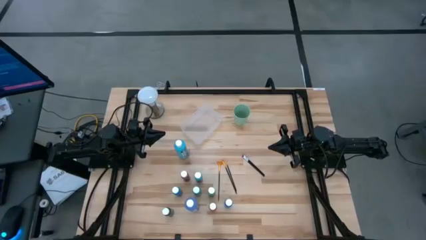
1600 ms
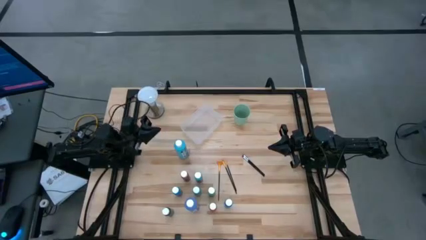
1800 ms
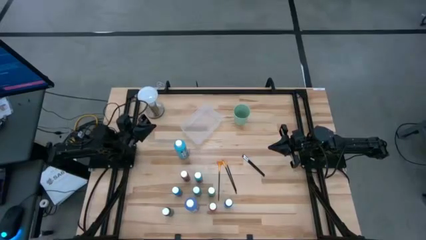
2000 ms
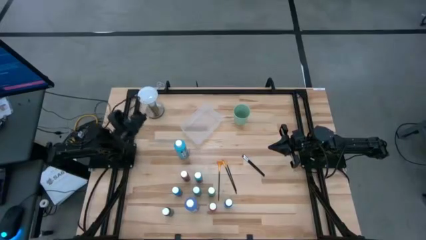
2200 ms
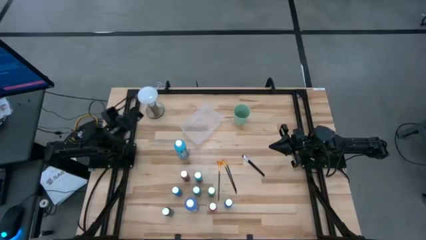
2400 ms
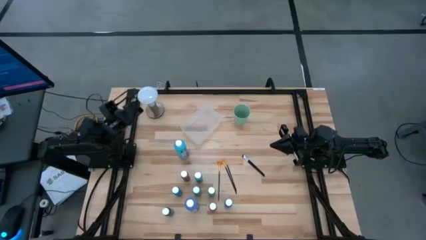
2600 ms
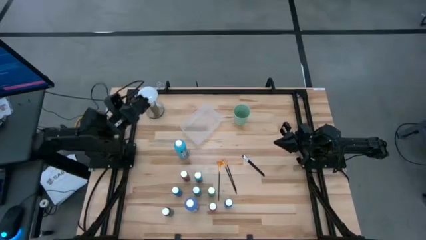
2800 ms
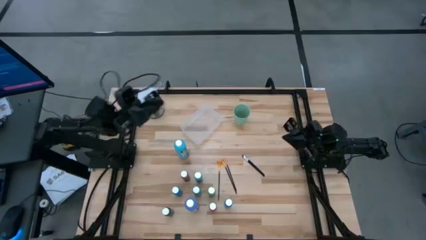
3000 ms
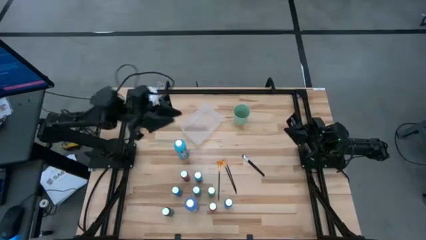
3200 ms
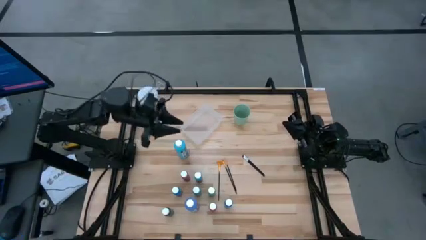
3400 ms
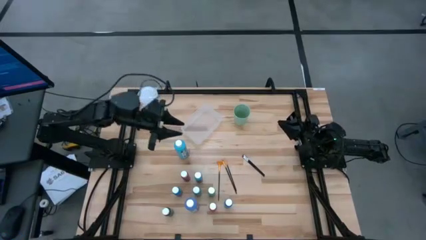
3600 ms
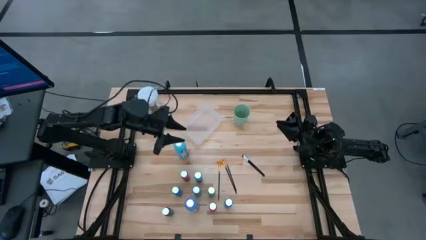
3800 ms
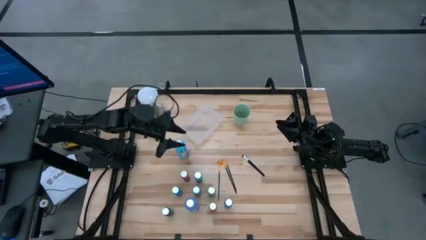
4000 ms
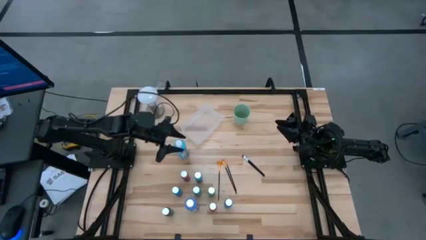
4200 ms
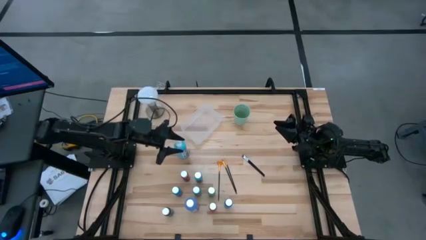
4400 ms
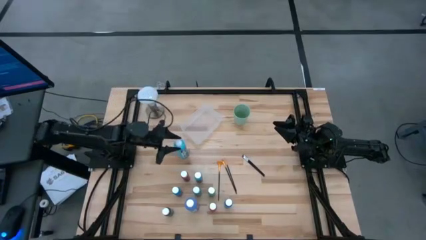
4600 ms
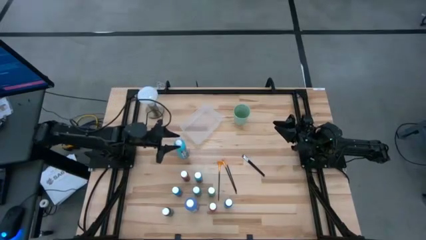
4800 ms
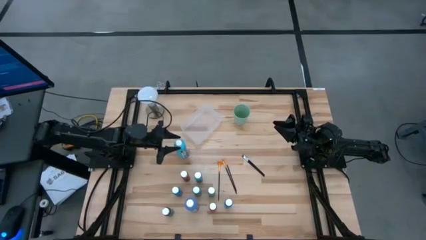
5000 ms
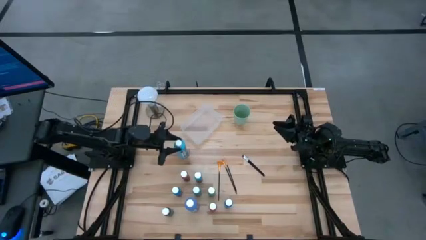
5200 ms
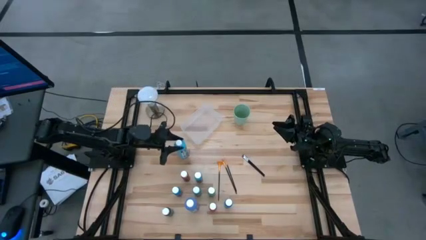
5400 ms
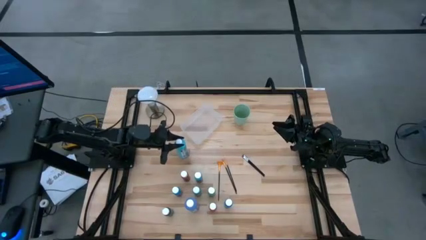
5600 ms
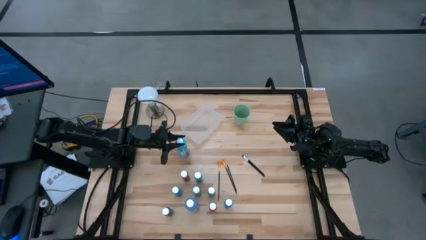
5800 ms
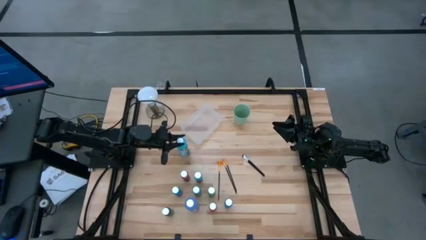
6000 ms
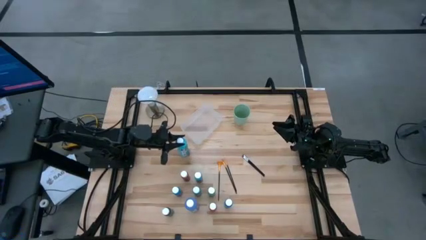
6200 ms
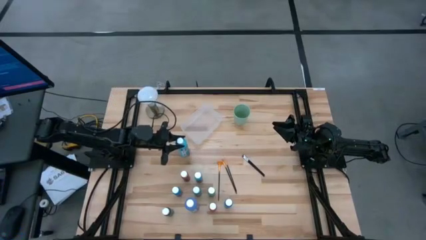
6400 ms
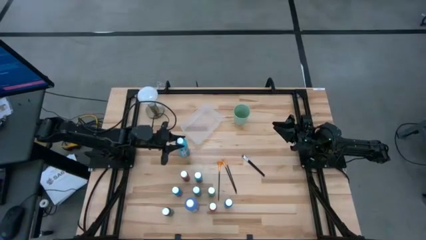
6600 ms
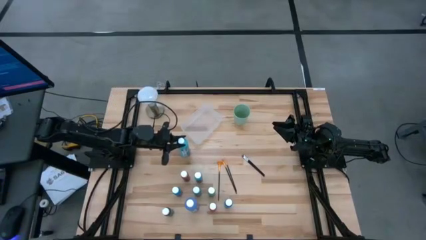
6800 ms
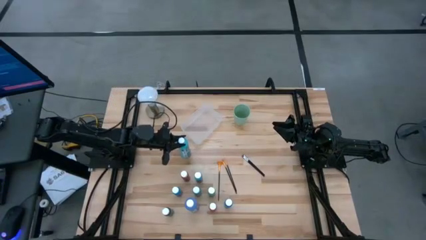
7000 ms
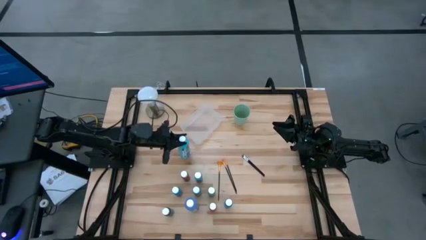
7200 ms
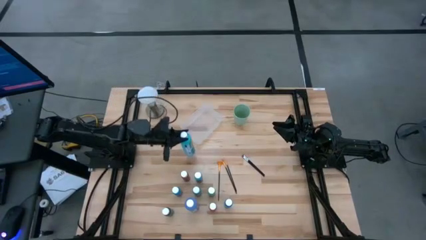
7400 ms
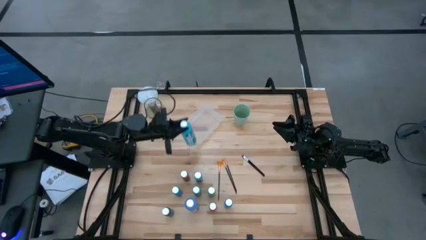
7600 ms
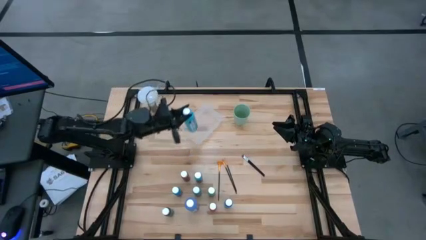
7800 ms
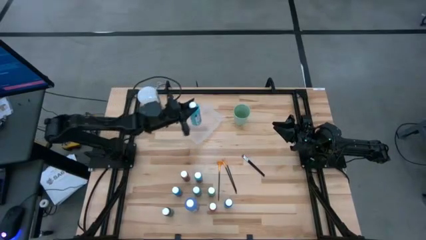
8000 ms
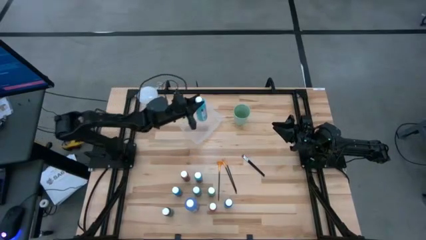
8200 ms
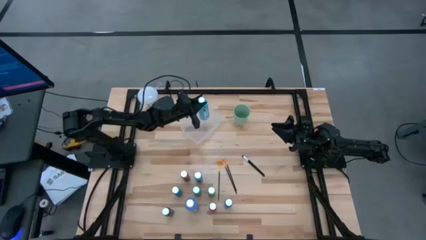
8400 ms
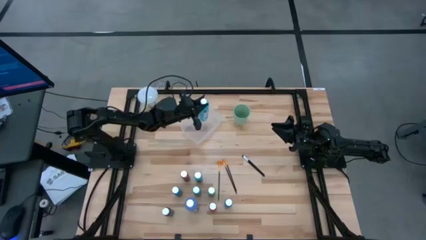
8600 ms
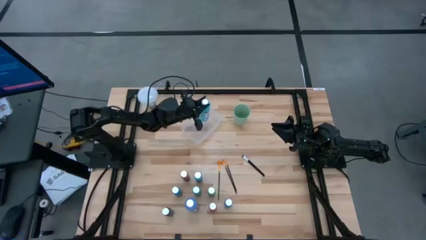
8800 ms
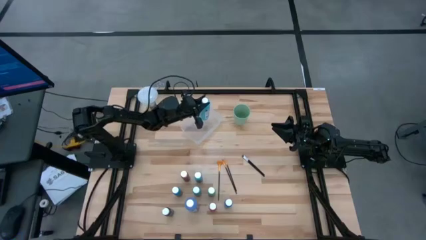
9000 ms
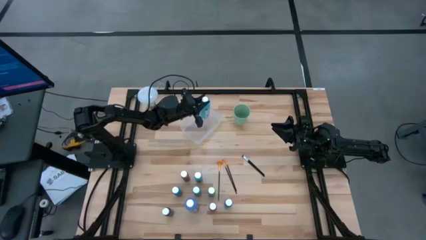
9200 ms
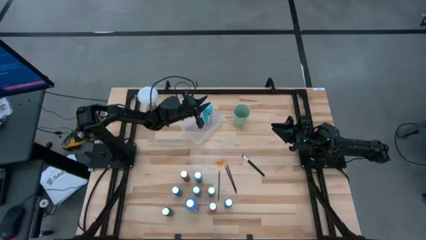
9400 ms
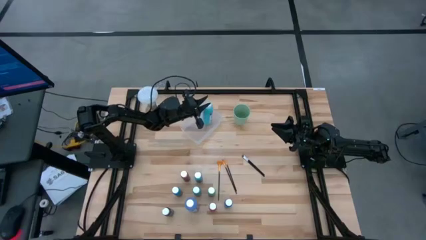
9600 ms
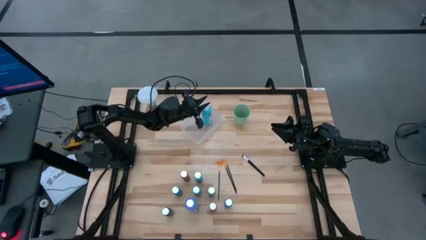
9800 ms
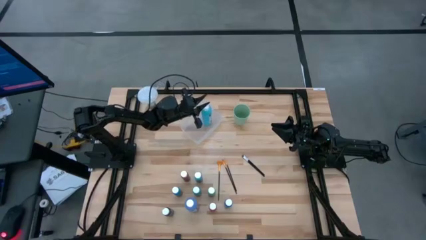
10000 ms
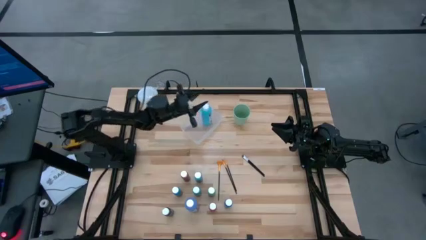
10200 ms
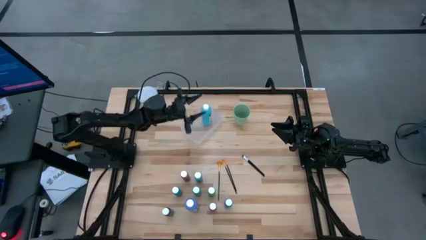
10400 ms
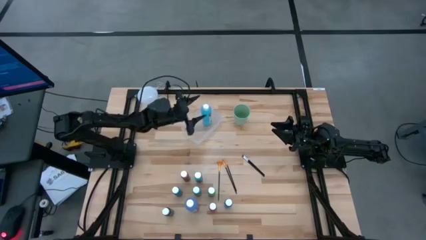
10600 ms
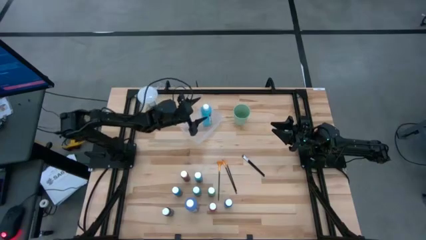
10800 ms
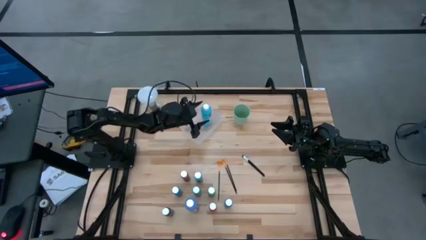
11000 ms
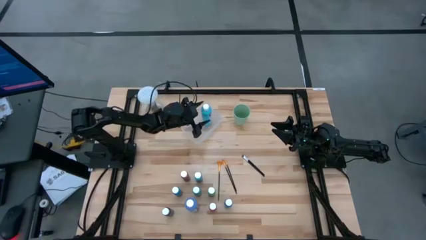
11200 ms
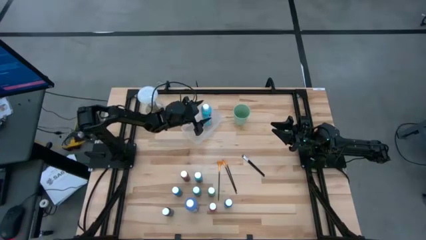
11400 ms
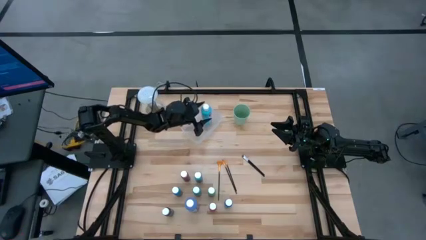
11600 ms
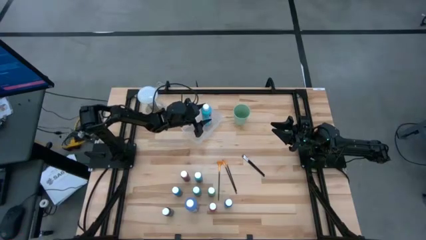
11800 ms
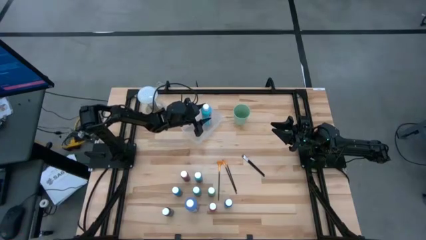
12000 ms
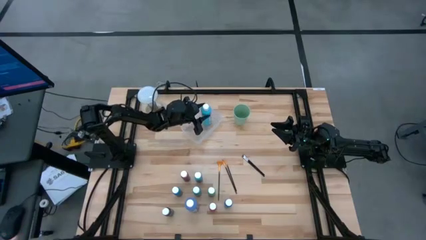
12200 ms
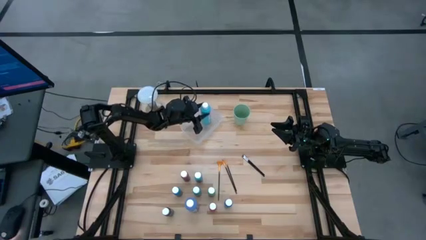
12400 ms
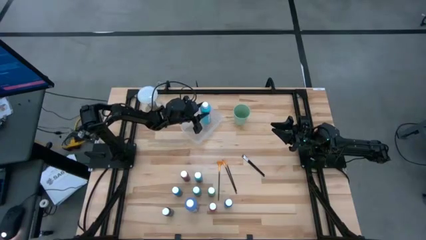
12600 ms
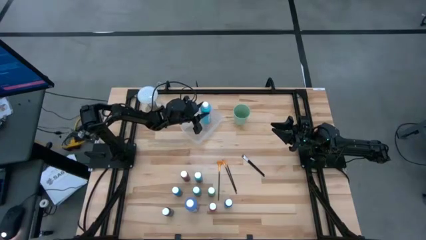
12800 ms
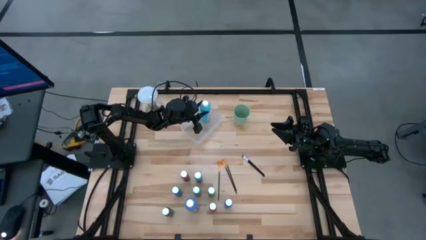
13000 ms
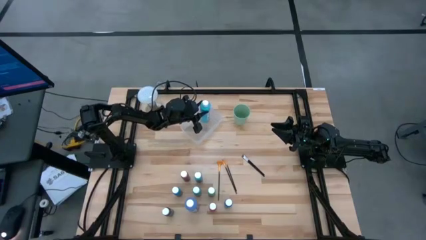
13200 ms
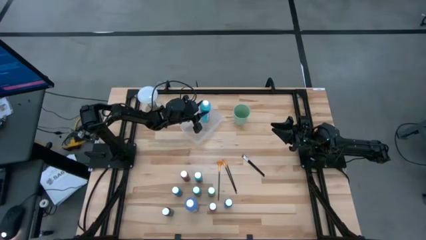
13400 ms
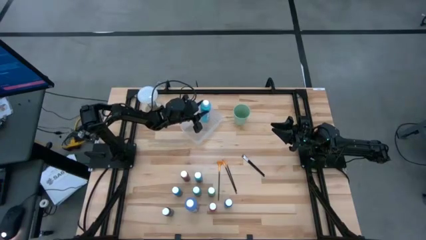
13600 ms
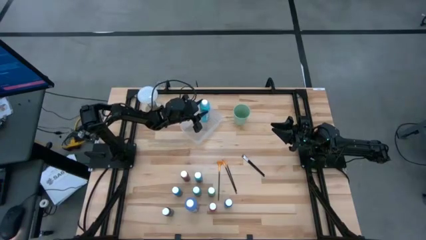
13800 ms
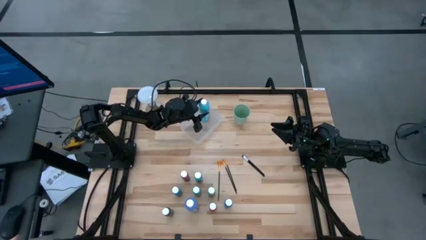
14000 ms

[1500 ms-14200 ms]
Task: Pick & Place Paint Supplies
Put the large light blue paint bottle into the transparent bin
